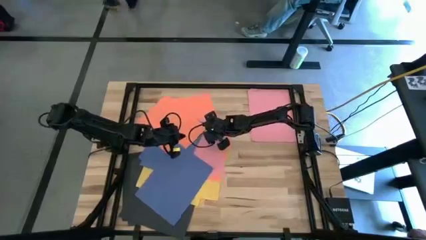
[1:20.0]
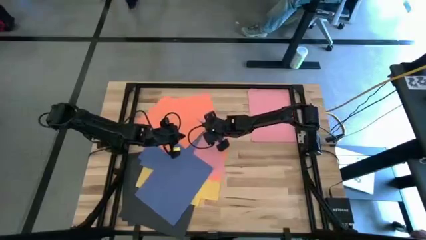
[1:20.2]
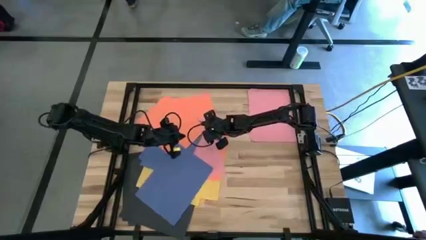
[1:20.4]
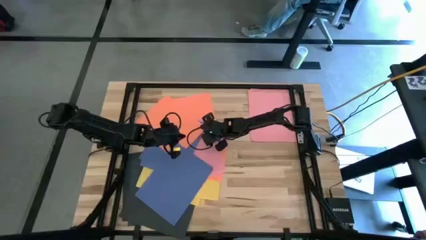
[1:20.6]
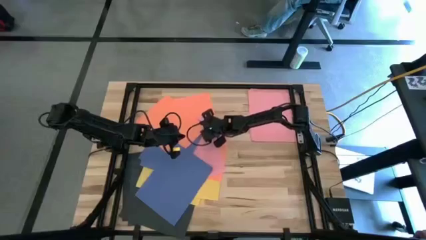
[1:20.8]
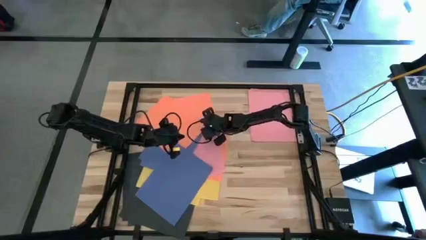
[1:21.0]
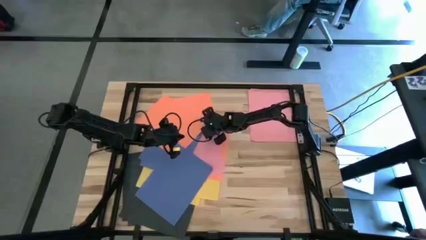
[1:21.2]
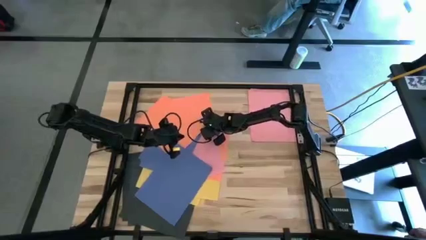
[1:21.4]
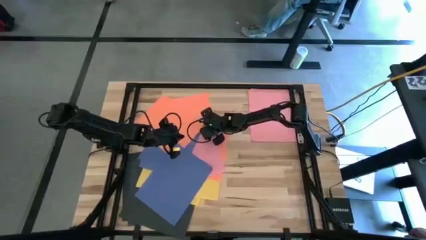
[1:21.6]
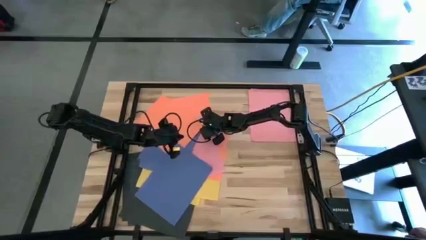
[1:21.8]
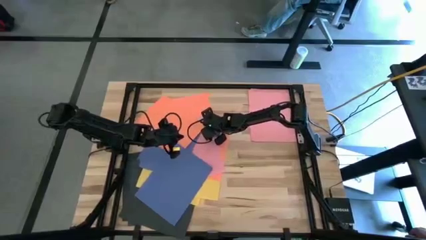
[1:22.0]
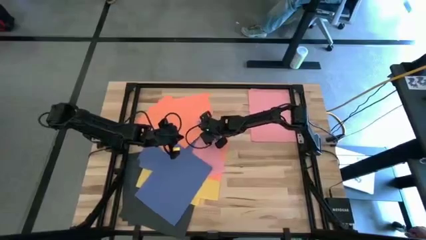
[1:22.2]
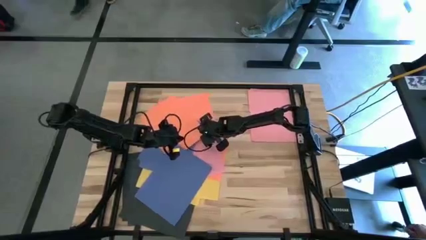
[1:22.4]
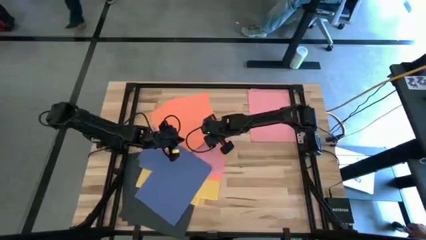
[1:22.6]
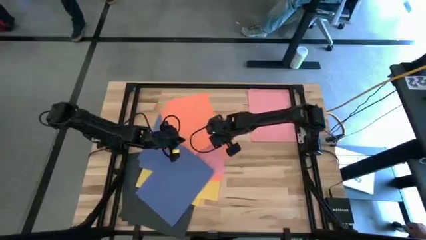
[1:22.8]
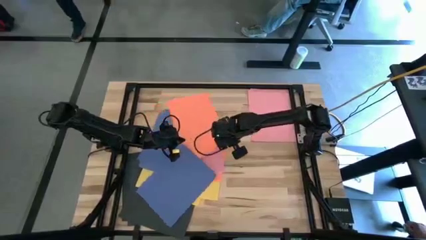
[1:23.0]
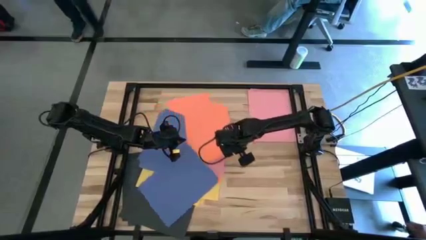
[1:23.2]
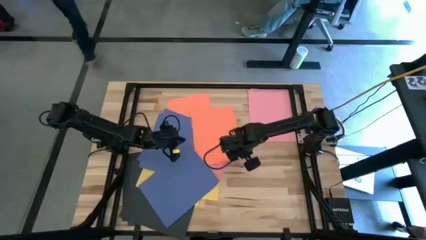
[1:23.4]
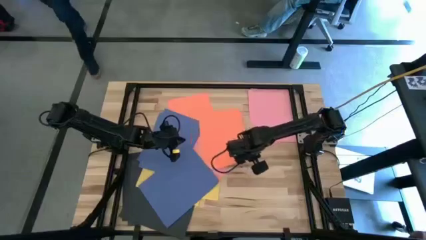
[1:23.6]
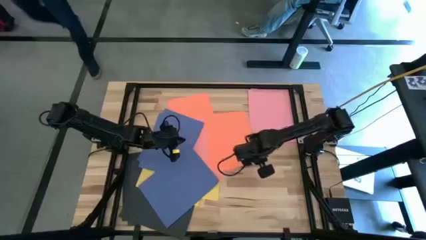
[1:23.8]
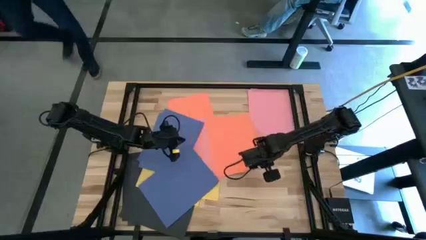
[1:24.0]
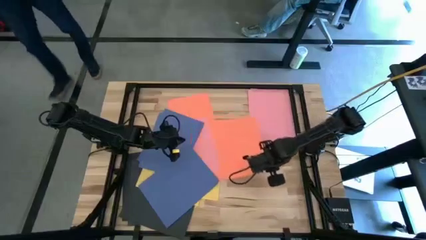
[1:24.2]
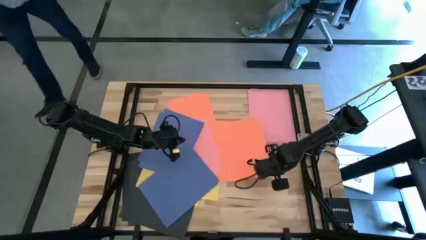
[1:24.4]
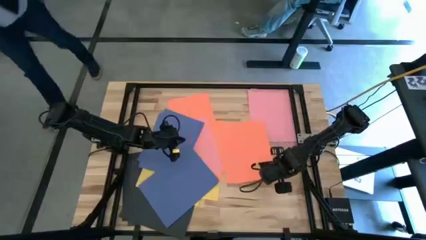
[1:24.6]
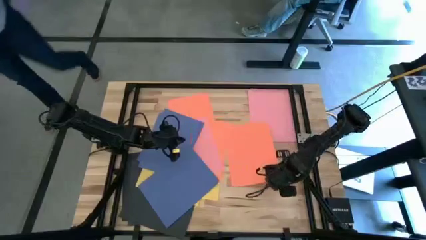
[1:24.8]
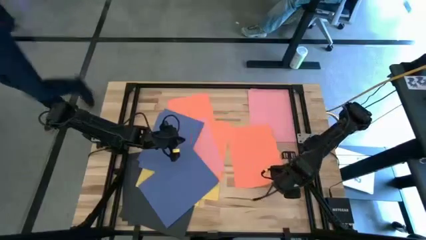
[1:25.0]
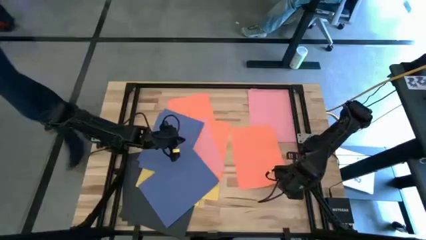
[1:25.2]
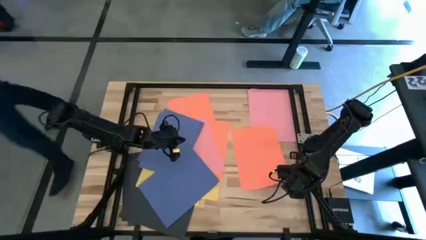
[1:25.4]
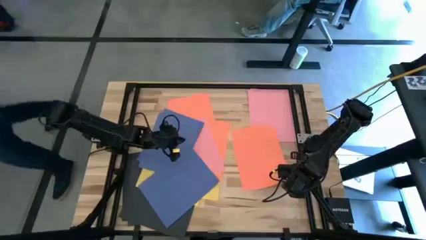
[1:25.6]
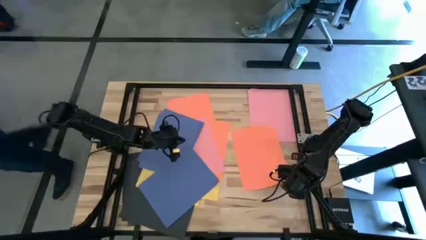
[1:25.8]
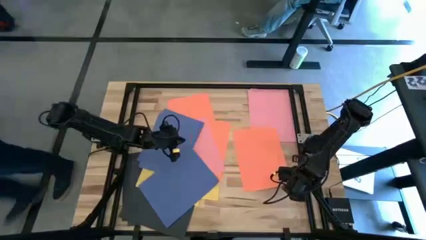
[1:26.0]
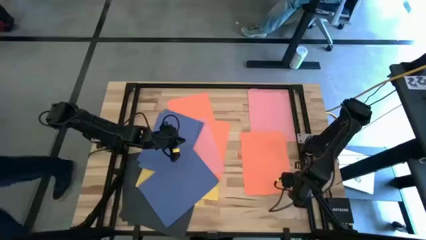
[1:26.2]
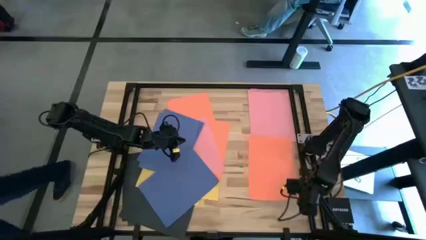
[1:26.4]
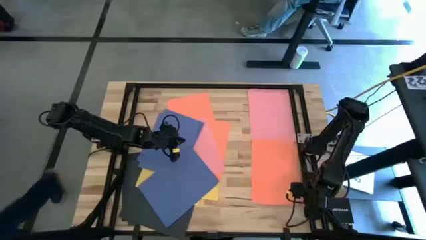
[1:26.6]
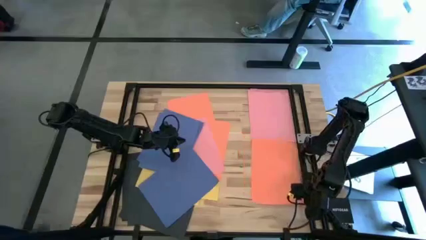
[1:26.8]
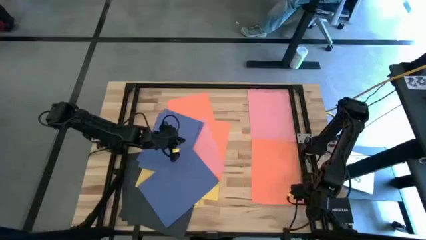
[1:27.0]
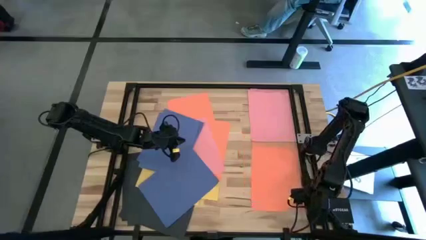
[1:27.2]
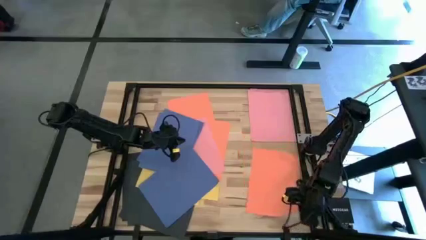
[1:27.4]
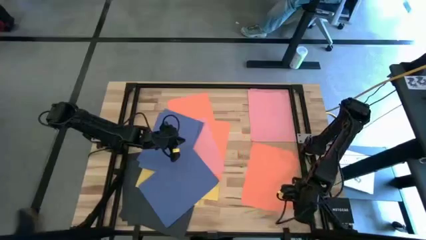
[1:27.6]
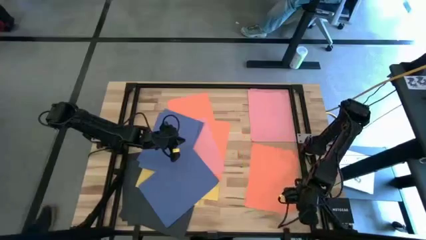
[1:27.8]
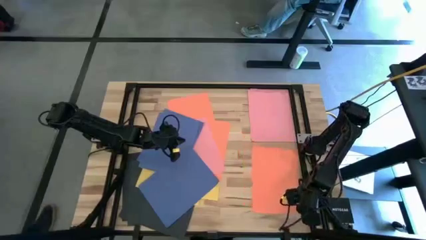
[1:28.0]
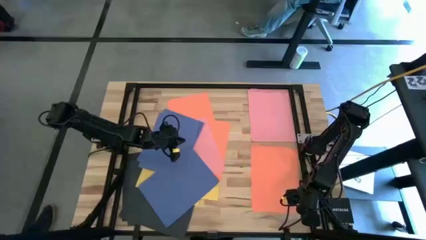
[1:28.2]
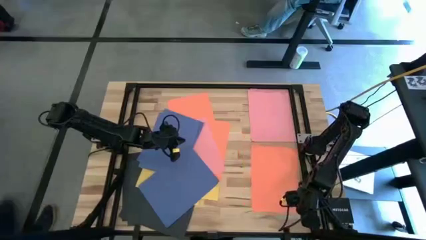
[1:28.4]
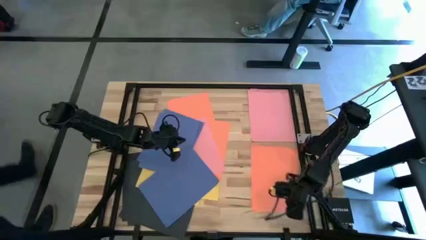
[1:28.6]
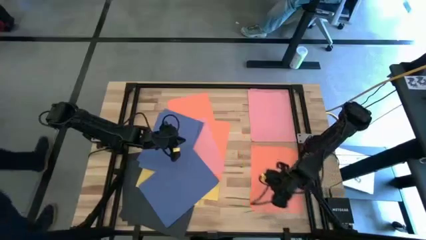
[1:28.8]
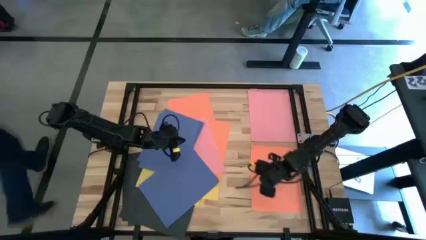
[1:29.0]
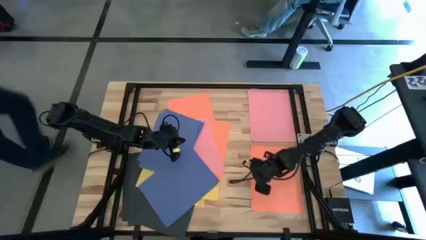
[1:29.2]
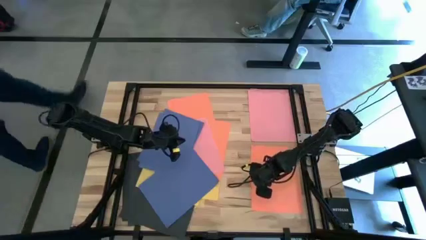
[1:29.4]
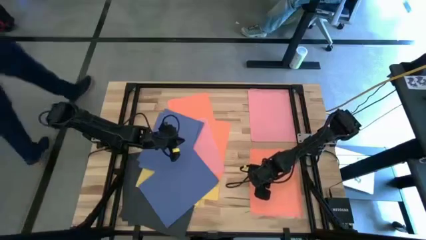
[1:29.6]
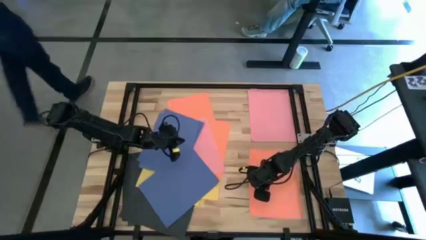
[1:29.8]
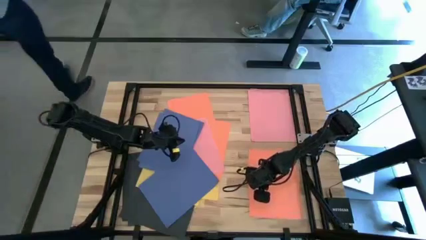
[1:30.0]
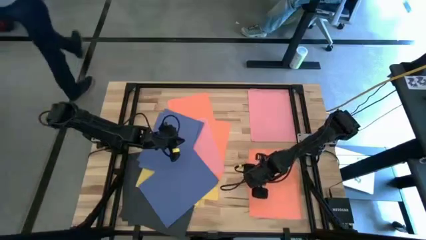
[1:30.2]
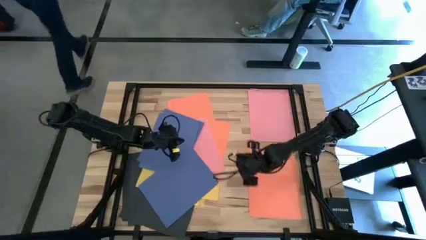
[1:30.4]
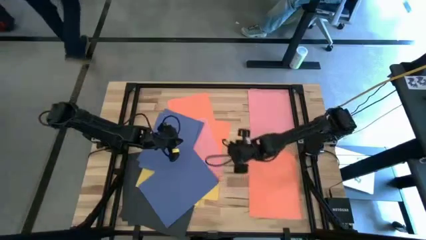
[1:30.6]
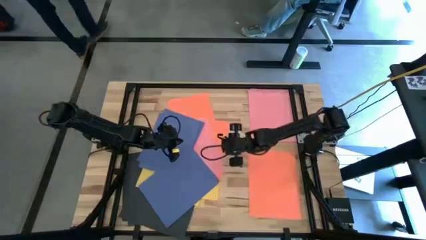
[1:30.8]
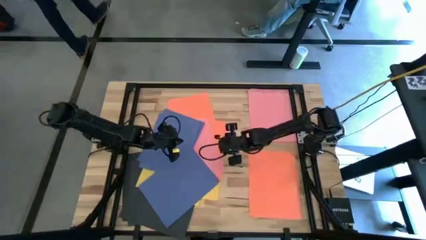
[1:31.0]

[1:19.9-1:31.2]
Task: Organize paper
Put the orange paper to the bottom right of the table

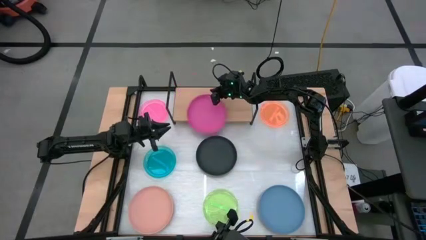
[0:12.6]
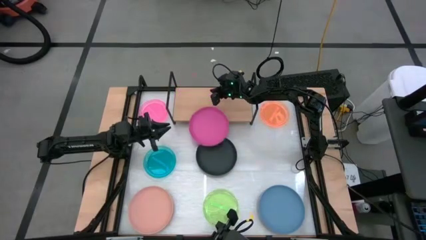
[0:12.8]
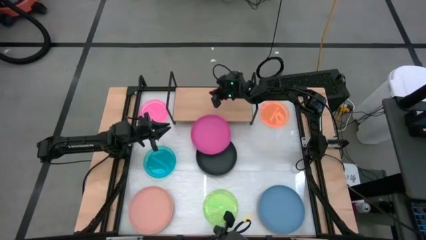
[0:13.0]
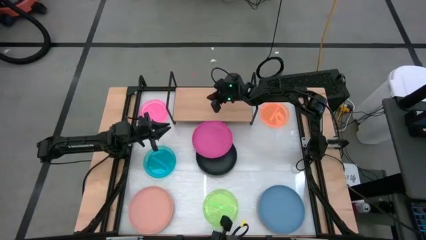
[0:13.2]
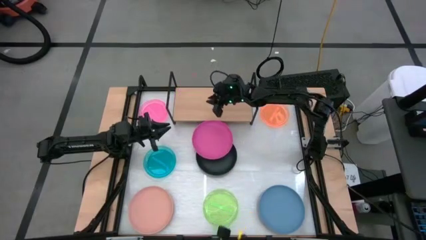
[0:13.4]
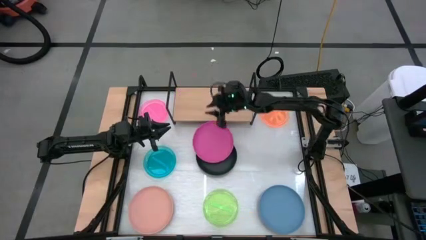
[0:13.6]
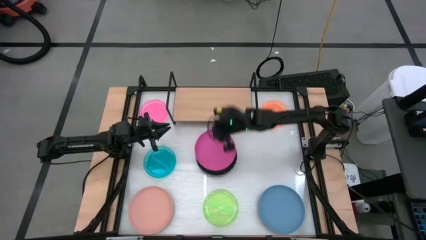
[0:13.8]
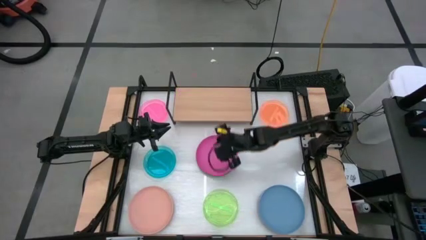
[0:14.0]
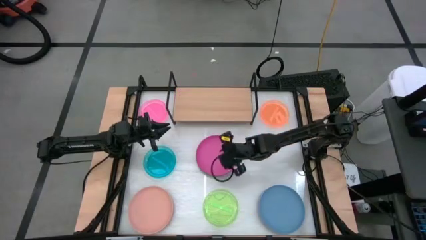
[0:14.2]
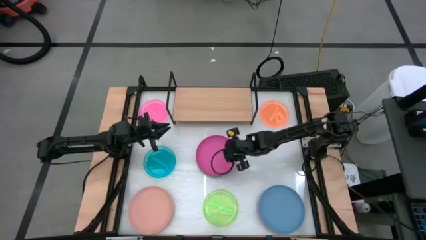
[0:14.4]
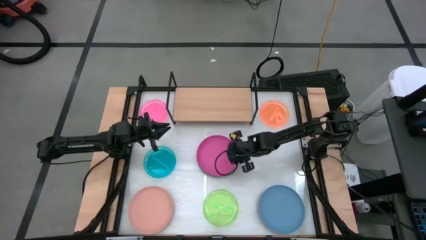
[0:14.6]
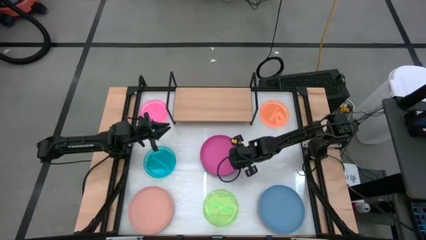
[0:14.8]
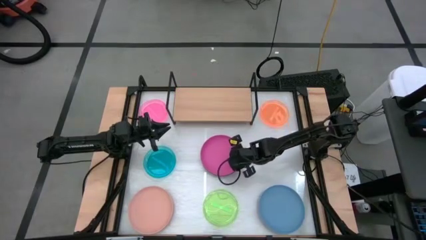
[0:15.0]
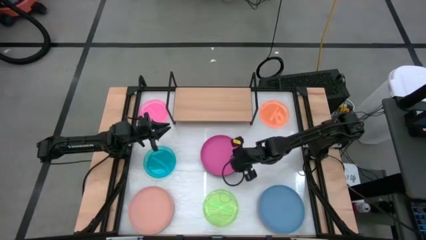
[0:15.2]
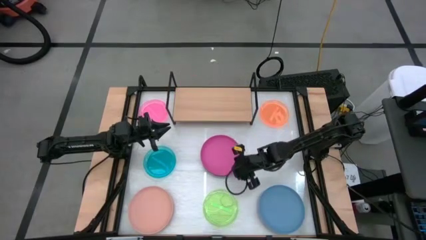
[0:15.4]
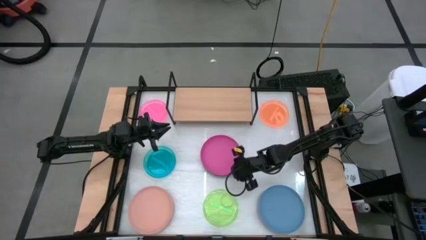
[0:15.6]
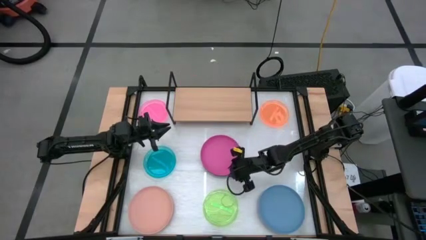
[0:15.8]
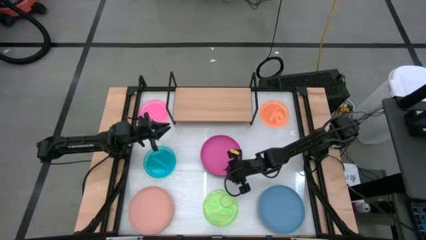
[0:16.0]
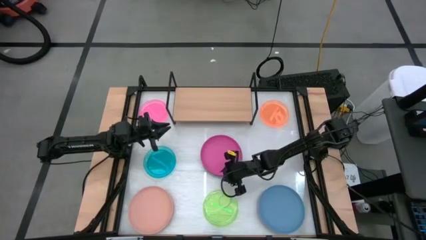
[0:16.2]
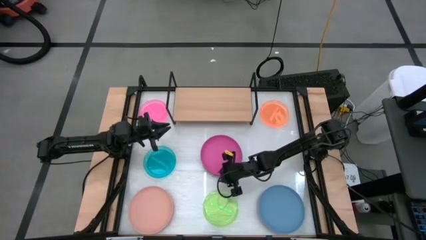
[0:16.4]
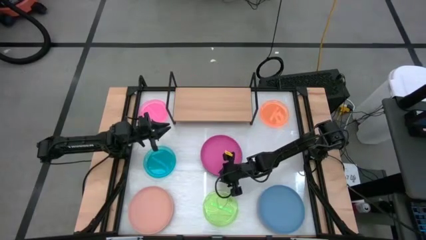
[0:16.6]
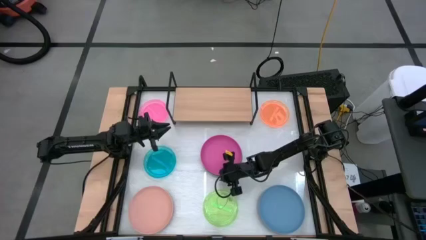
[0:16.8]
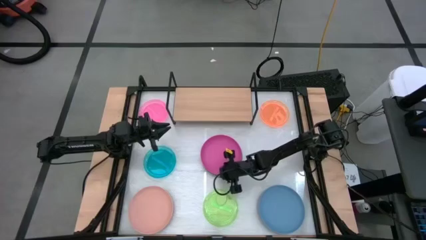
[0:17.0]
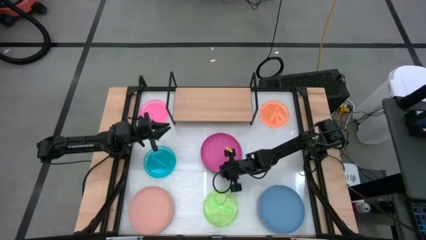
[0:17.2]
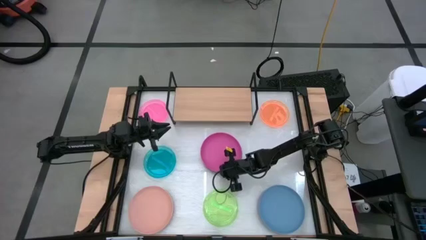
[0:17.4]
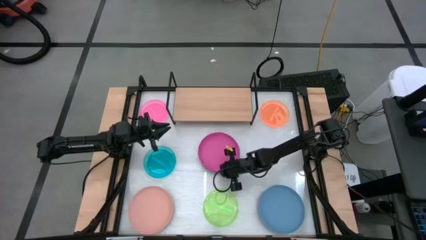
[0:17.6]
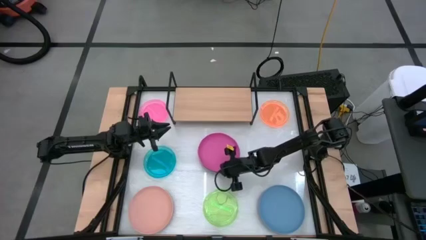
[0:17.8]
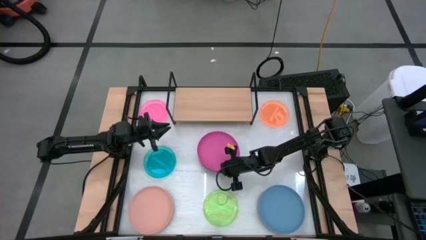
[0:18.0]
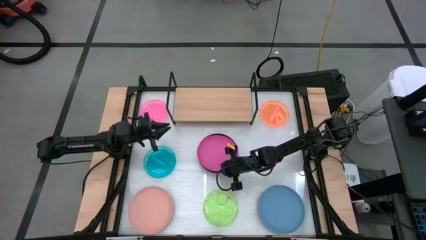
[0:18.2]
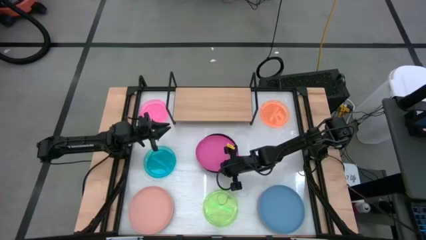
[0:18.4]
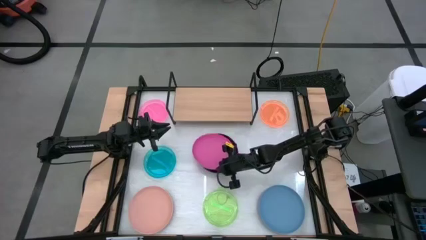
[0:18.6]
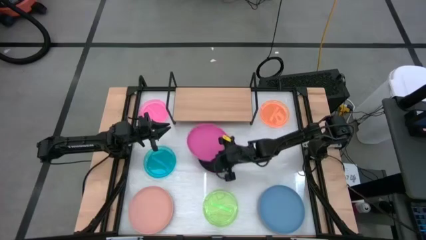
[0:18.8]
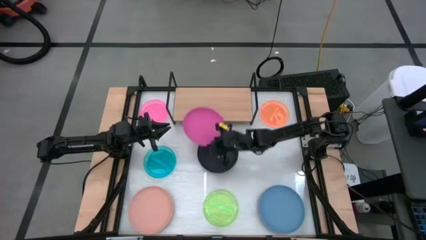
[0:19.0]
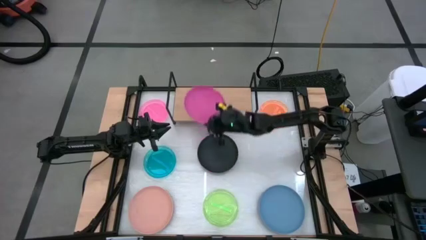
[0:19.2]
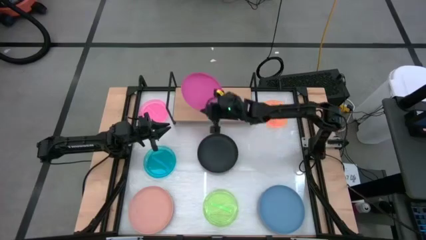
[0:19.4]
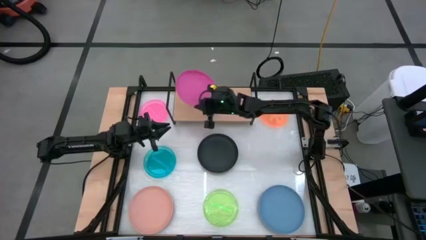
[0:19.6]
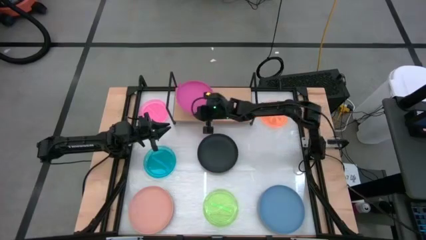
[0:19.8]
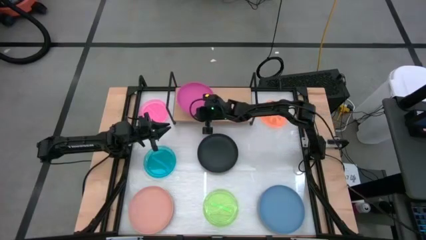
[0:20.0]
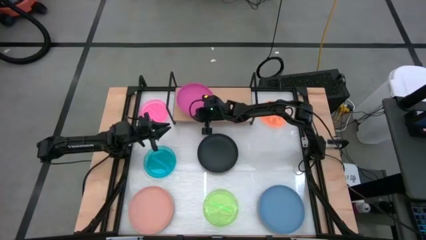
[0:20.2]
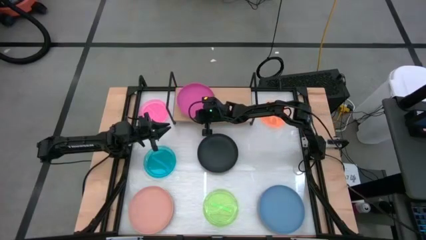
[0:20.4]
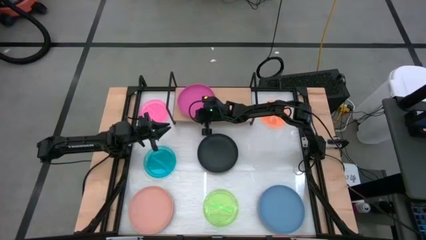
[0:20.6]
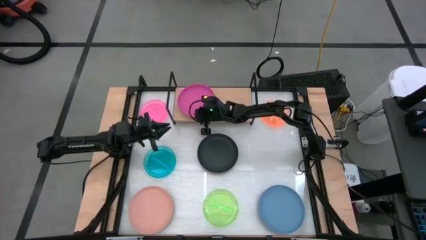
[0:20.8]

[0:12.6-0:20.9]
Task: Place and stack plates onto a shelf
Put the pink plate on the shelf
